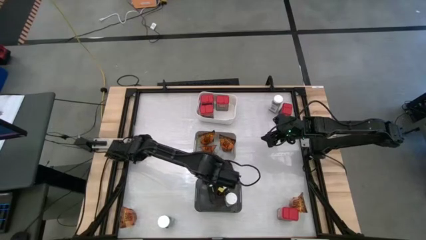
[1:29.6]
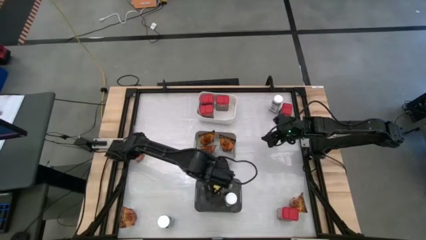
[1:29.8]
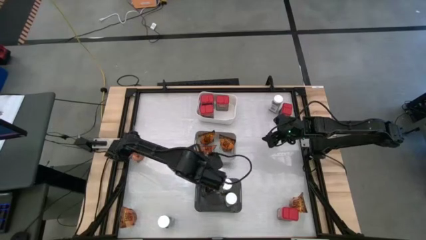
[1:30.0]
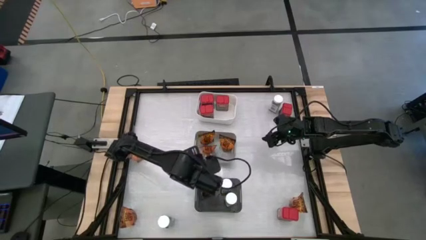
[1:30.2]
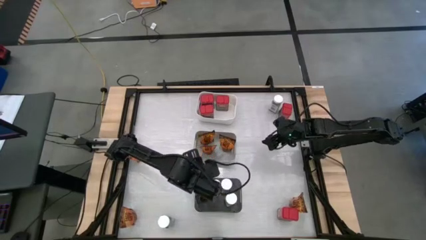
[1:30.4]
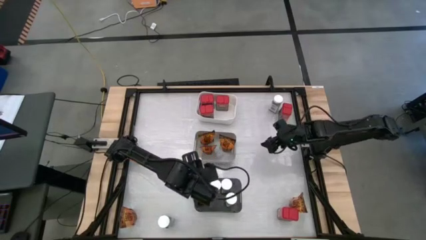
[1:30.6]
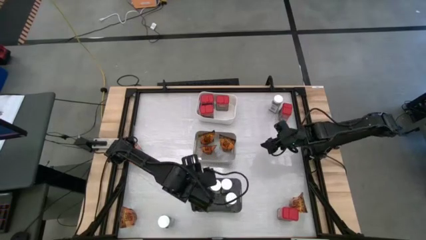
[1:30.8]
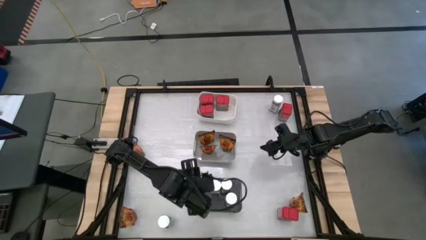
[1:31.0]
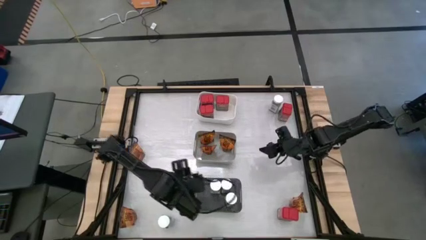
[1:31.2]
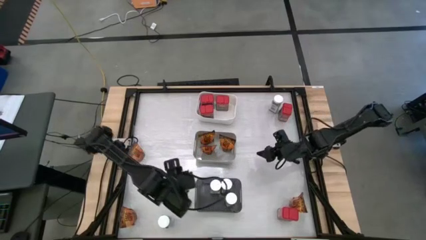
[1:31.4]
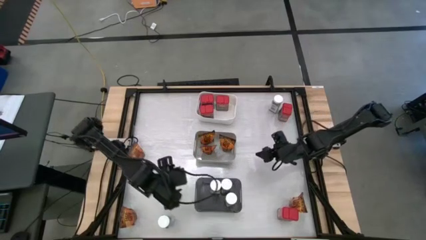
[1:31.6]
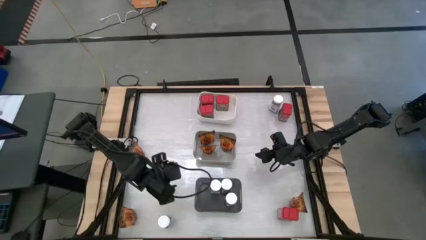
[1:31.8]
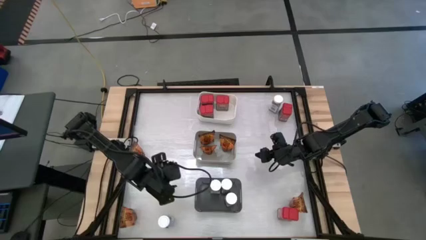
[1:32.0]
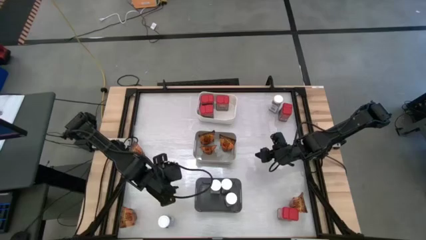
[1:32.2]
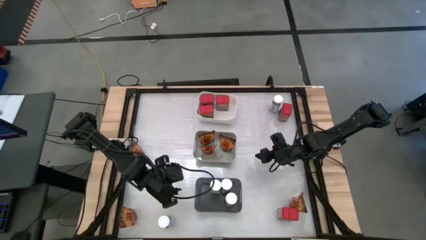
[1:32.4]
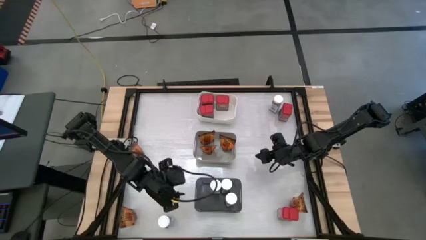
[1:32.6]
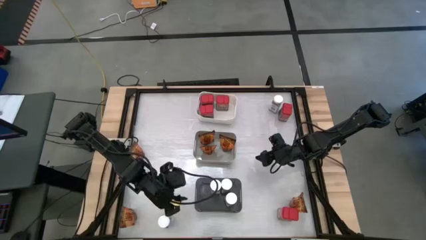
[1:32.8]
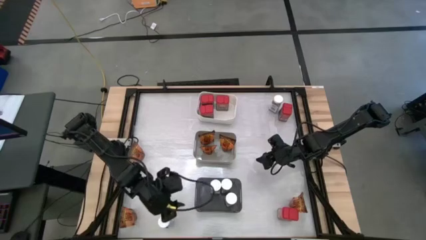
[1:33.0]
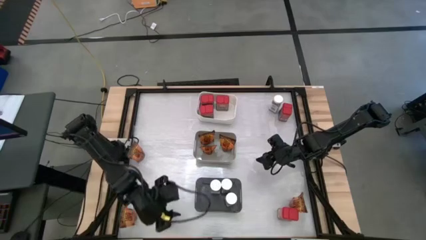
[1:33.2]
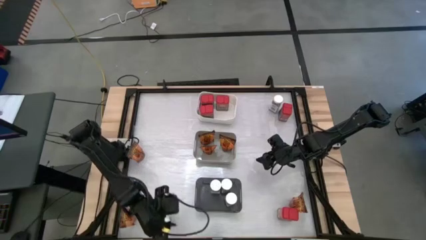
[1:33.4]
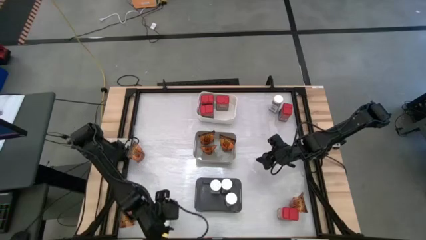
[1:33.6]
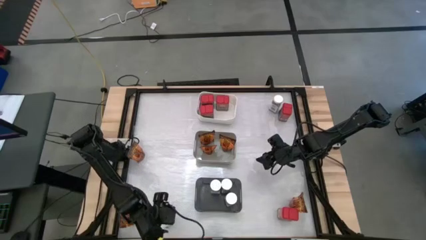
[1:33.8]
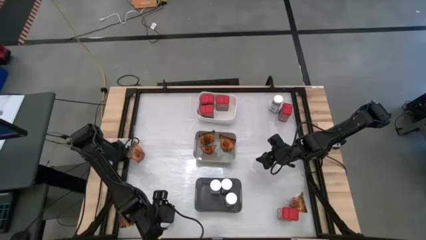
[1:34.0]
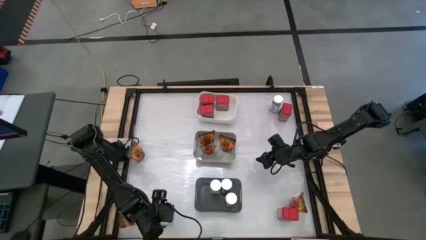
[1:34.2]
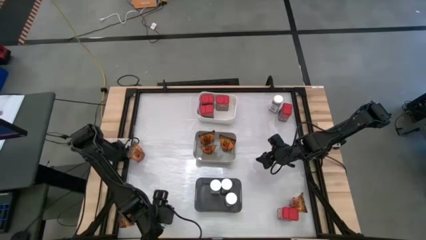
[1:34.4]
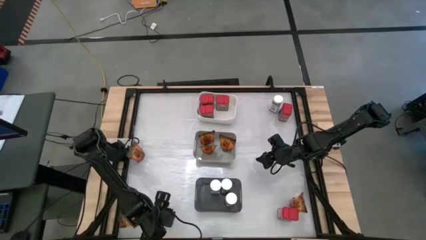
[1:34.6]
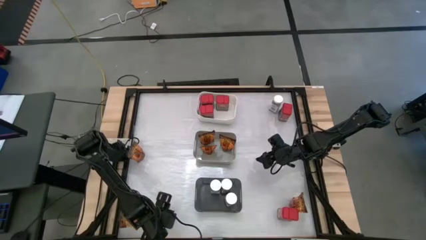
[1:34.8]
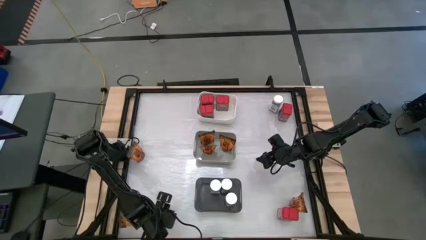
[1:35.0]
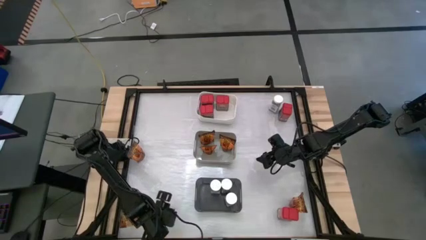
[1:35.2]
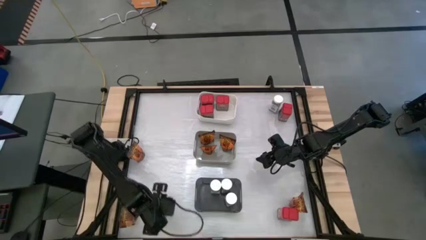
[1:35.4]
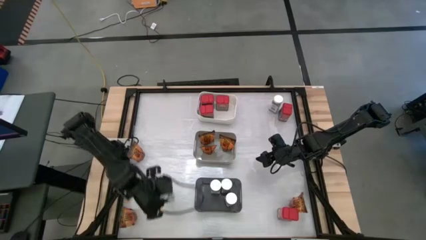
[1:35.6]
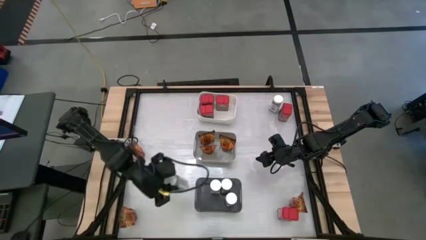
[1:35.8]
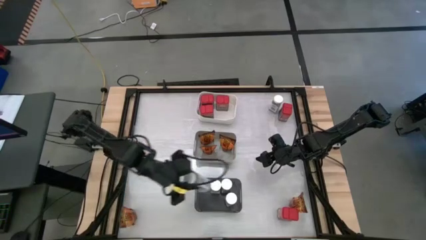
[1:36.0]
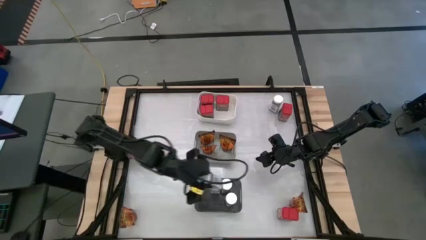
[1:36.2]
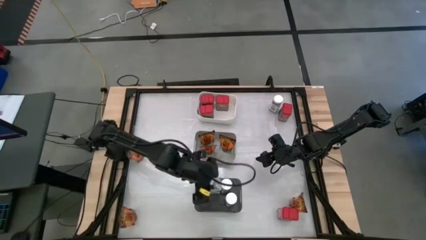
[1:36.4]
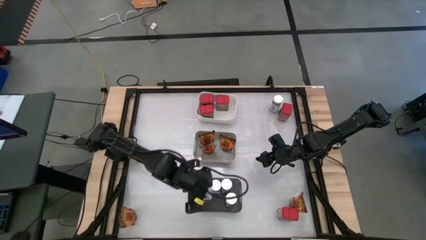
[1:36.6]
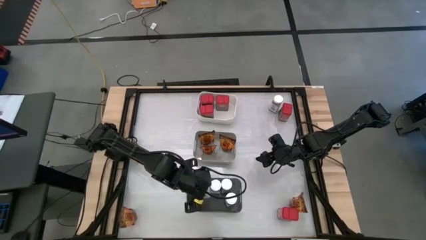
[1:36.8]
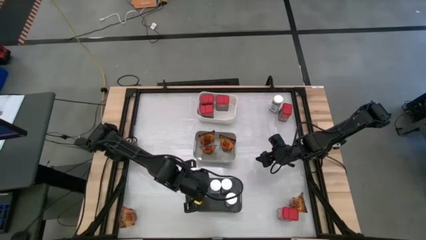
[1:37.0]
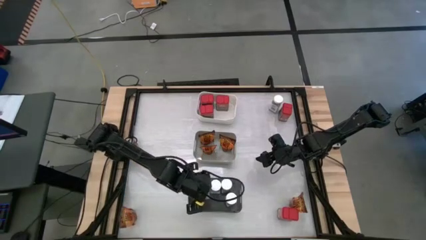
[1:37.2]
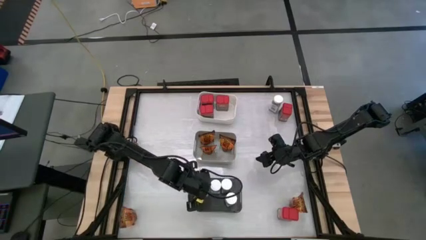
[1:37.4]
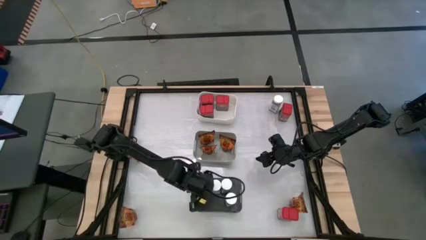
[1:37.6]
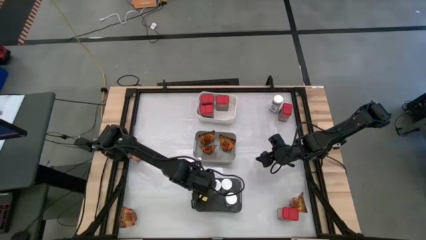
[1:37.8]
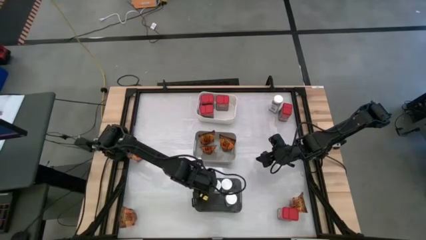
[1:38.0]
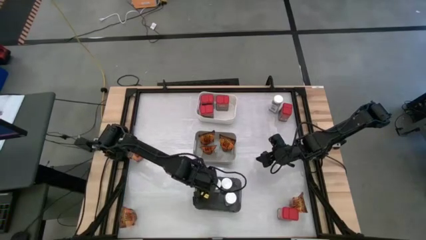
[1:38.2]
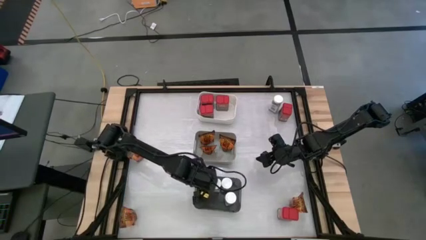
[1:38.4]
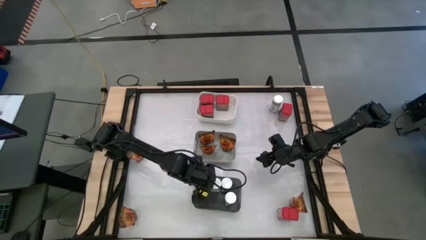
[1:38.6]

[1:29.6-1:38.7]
Task: Sort spices by type
Put the white seasoning bottle into the black bin

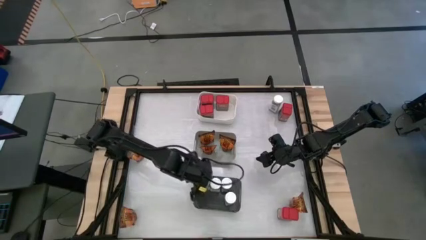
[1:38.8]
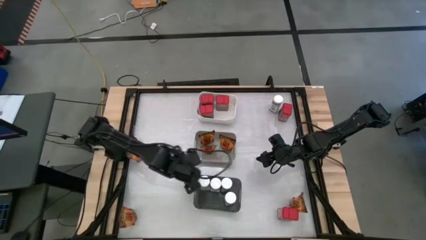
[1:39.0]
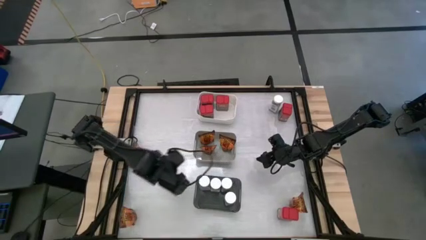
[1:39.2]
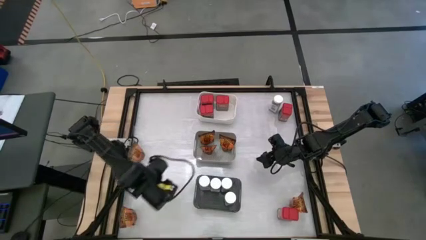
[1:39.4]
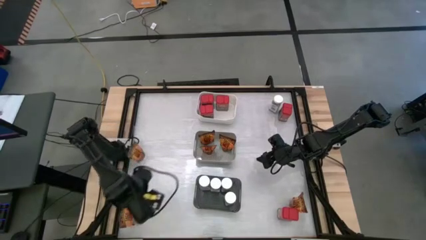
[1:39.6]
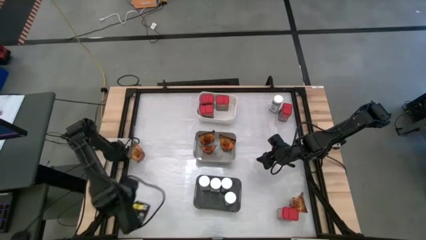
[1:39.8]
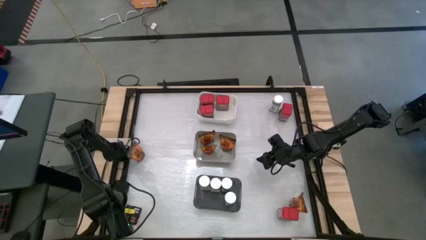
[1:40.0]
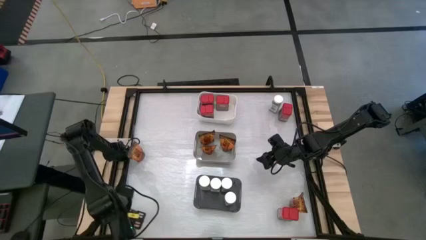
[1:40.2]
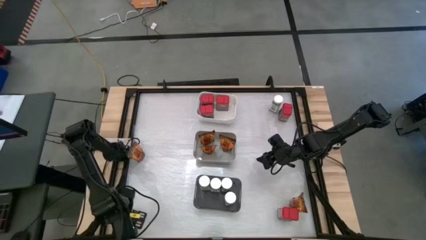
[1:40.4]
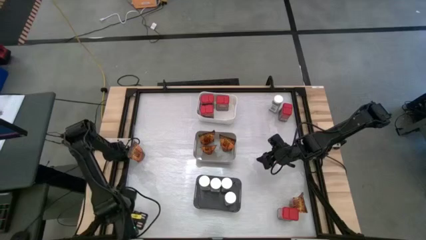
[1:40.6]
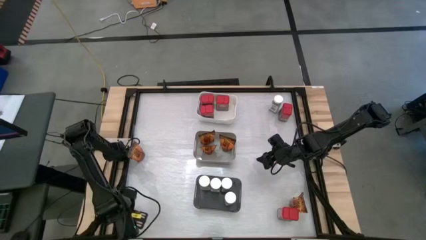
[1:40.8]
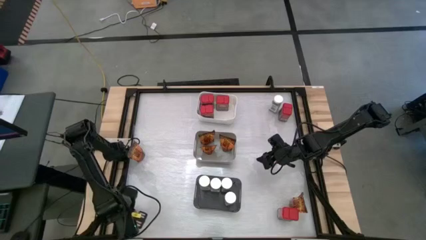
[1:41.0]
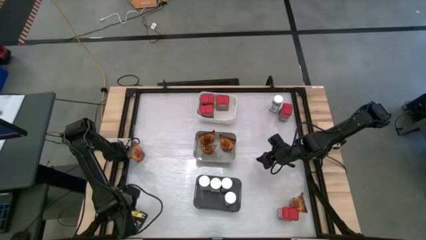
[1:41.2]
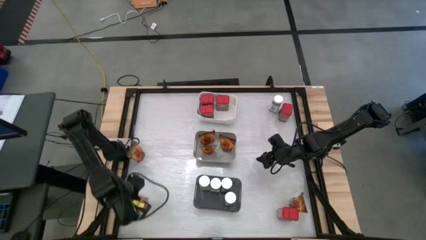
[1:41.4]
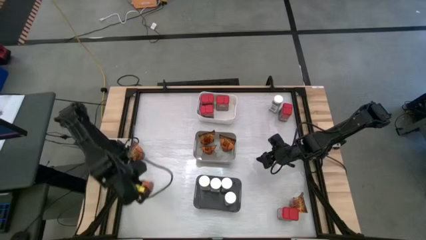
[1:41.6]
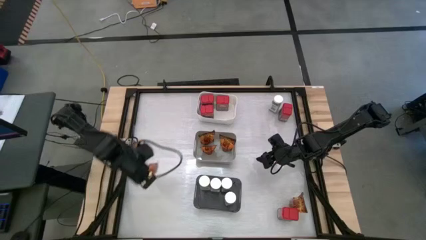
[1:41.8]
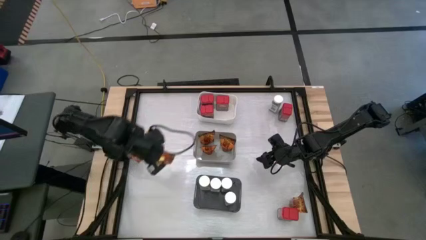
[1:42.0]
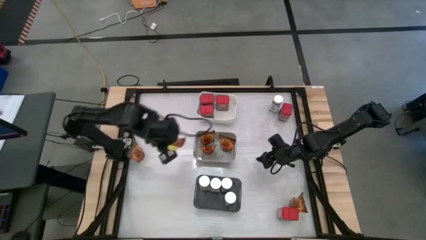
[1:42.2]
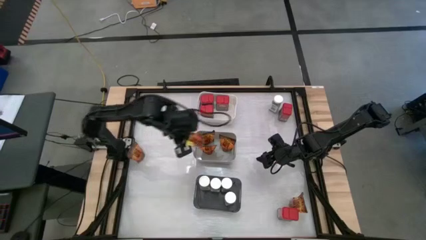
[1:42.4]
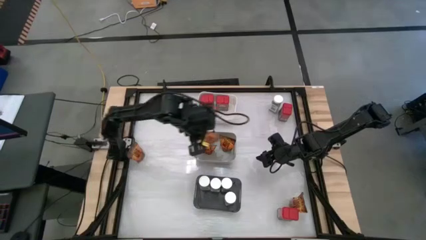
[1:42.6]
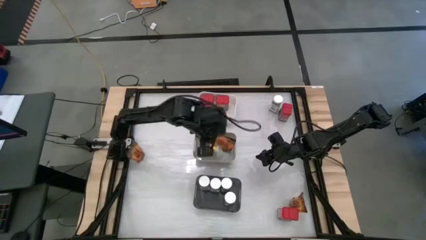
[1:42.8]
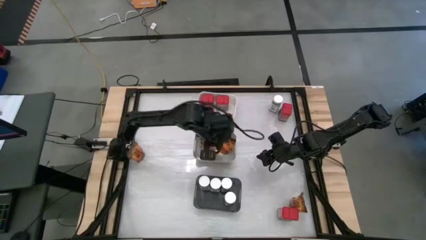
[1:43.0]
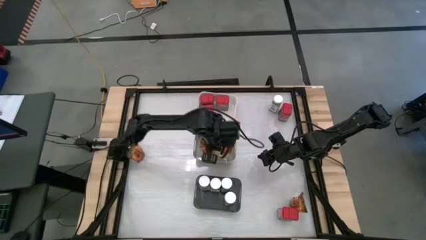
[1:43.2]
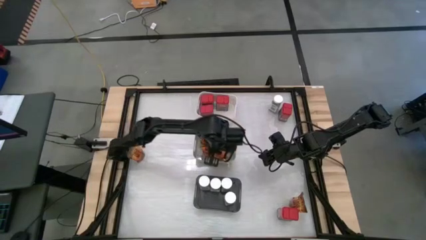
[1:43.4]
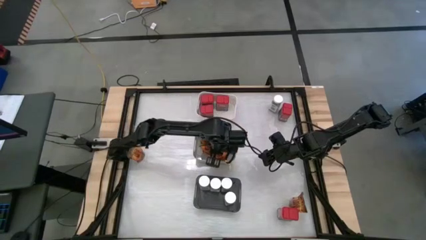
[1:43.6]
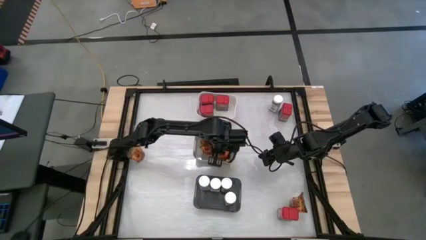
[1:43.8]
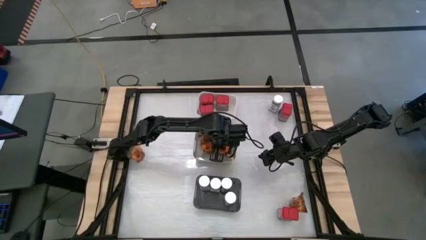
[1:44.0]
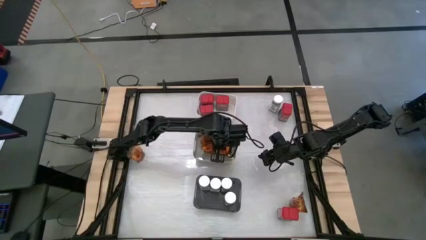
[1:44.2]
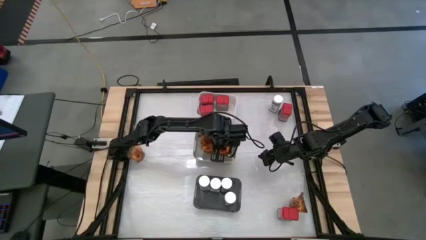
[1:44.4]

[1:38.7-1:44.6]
Put the orange seasoning bag into the gray bin

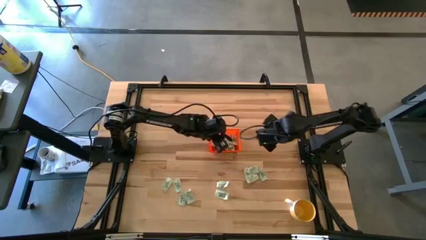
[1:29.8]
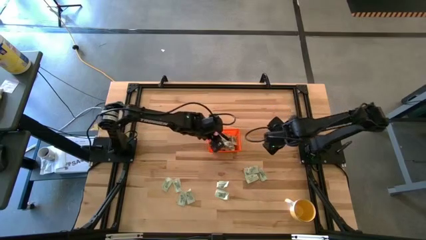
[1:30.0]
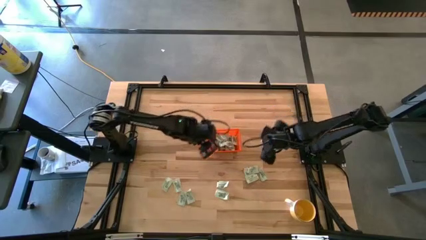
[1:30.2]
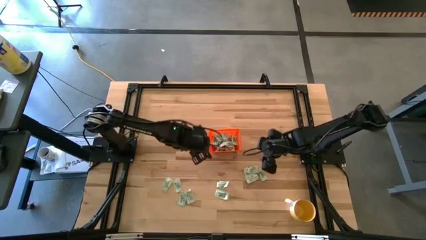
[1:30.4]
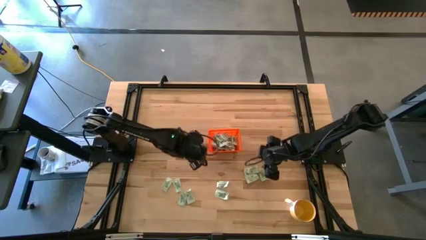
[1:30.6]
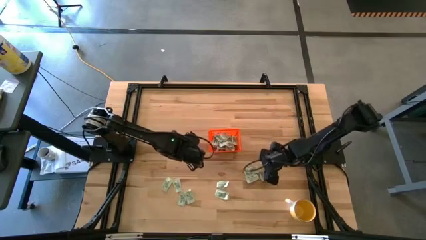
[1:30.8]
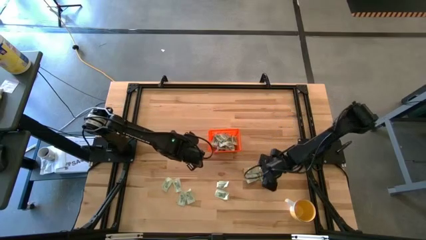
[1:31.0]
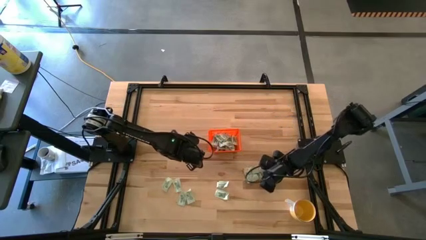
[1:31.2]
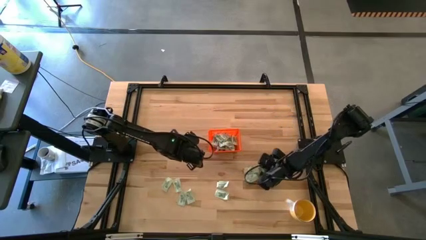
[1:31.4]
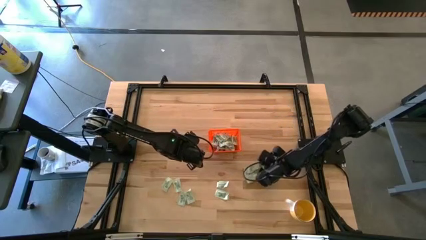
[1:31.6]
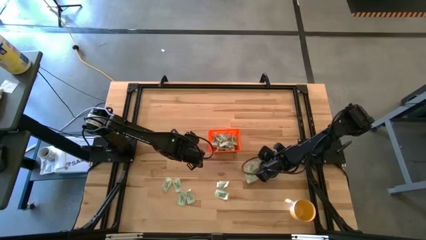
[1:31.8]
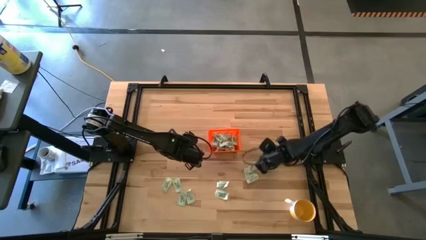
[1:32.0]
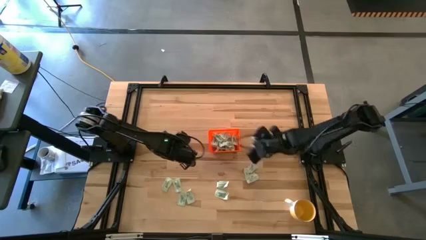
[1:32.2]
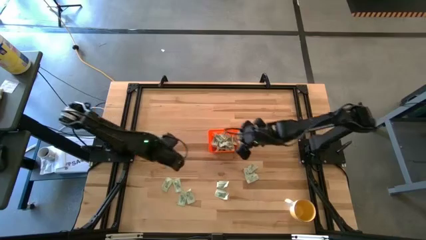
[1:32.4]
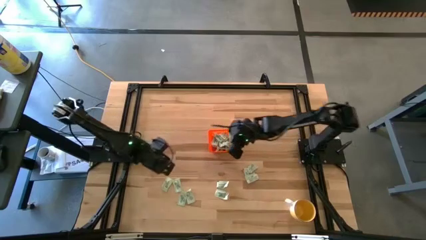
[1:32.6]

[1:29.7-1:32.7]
Task: Pick and place Stevia / Truvia into bins
Put the light green stevia packet into the orange basket
